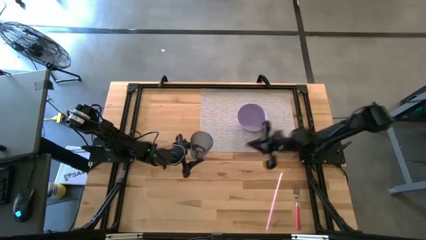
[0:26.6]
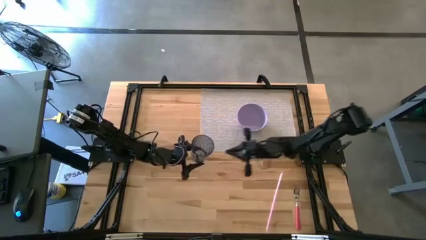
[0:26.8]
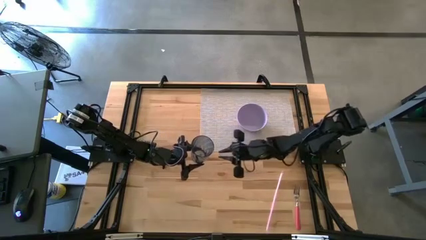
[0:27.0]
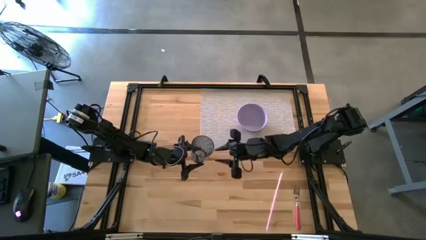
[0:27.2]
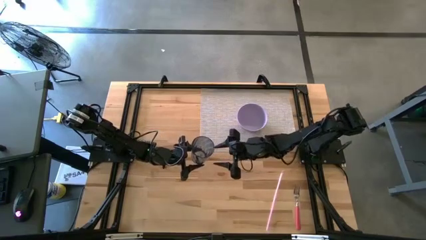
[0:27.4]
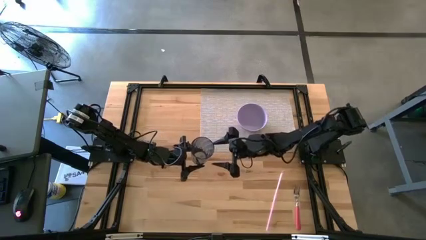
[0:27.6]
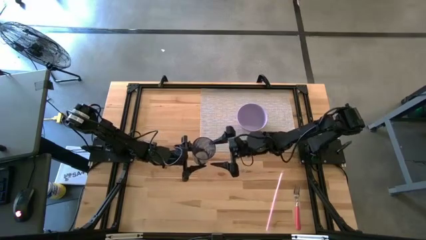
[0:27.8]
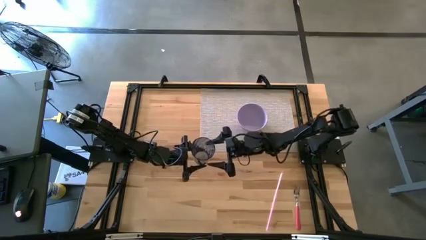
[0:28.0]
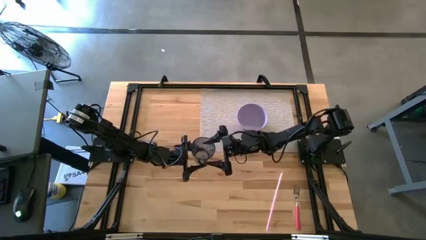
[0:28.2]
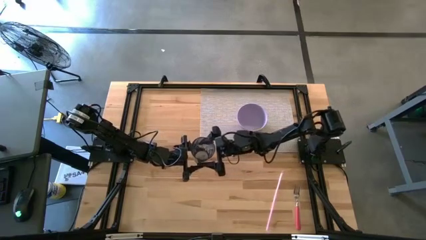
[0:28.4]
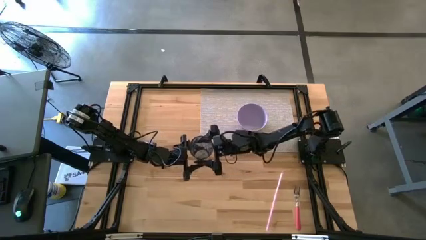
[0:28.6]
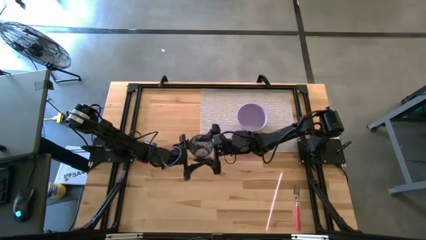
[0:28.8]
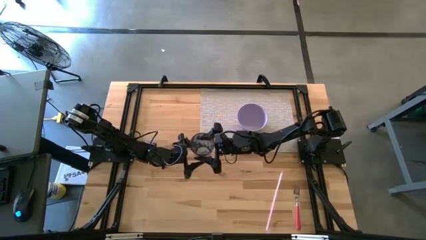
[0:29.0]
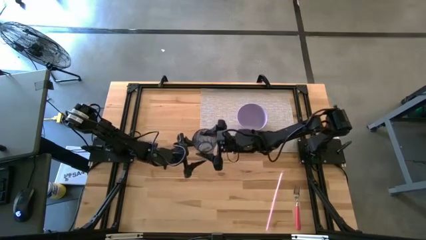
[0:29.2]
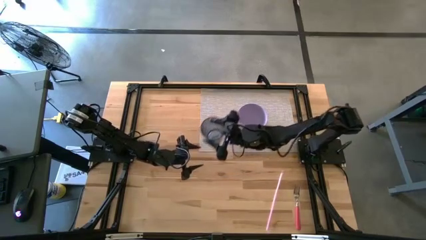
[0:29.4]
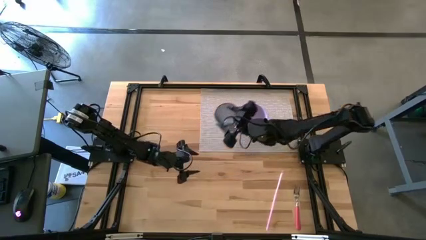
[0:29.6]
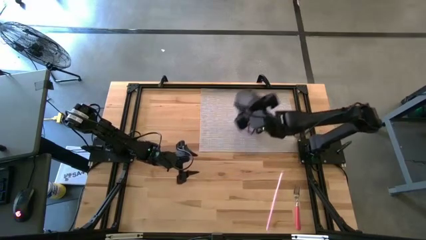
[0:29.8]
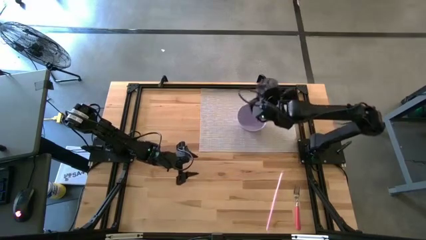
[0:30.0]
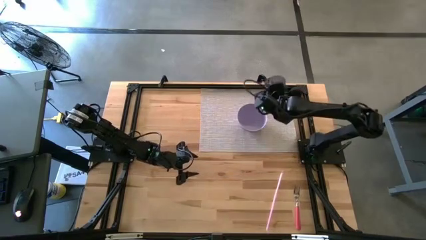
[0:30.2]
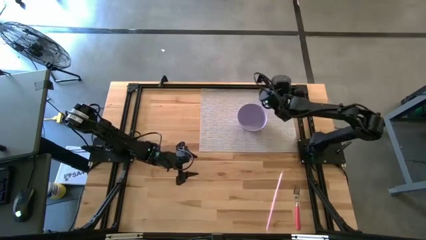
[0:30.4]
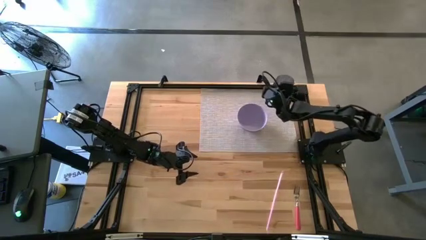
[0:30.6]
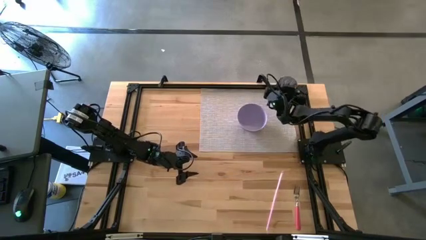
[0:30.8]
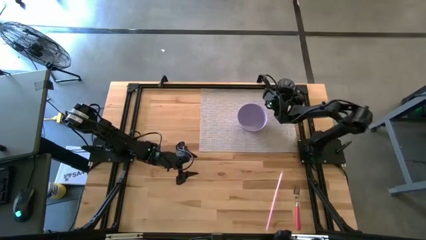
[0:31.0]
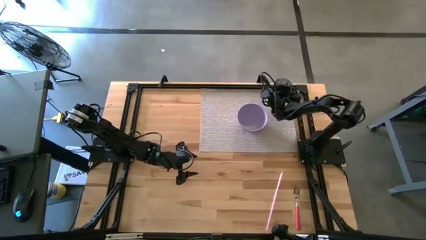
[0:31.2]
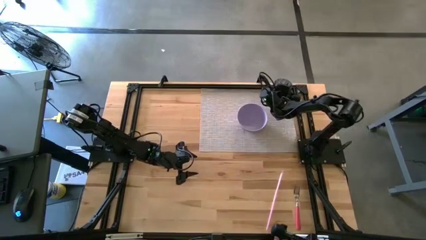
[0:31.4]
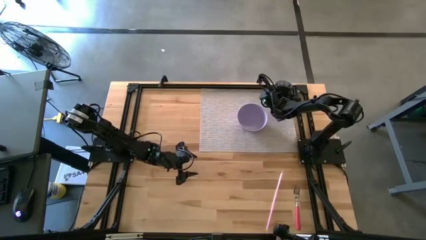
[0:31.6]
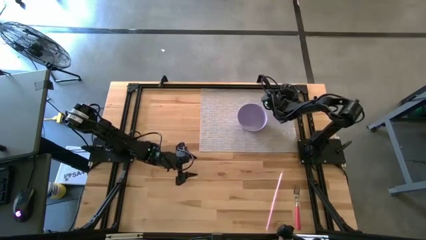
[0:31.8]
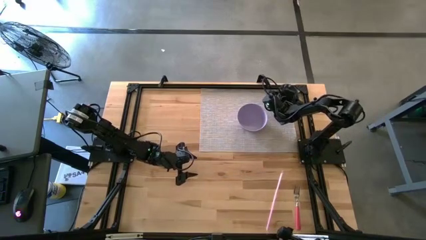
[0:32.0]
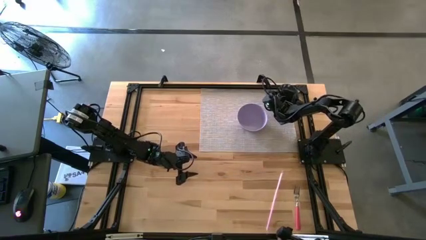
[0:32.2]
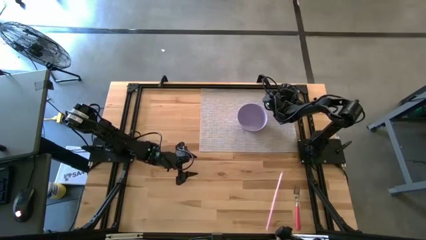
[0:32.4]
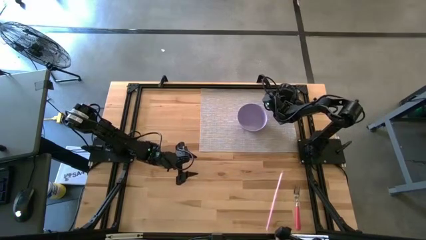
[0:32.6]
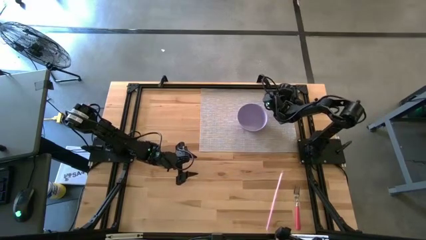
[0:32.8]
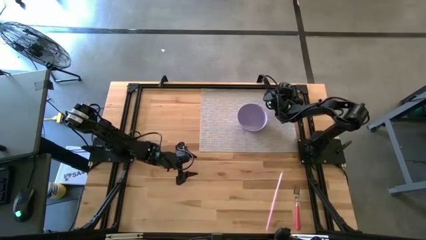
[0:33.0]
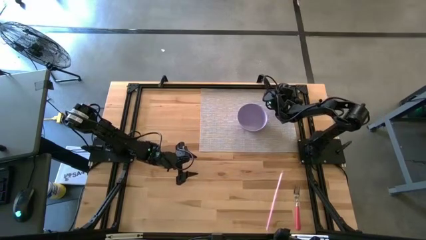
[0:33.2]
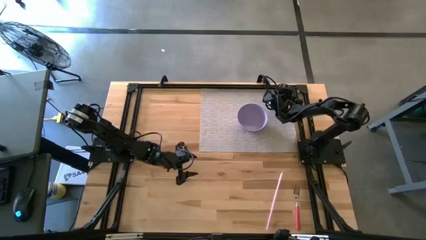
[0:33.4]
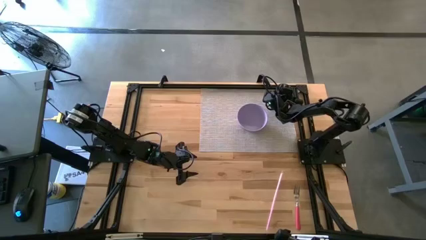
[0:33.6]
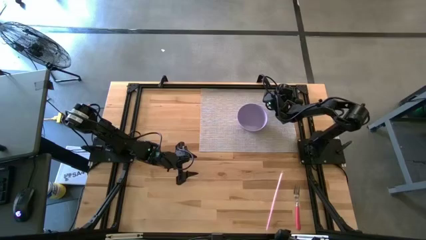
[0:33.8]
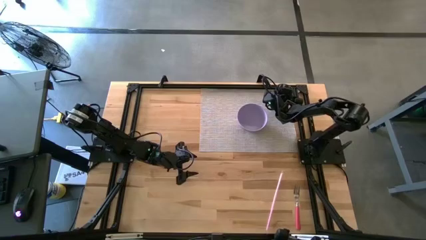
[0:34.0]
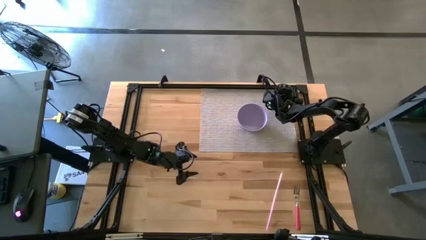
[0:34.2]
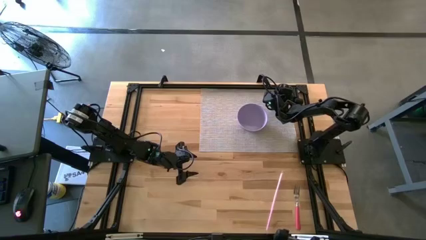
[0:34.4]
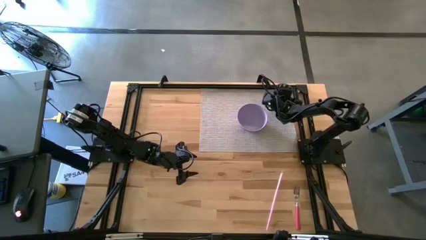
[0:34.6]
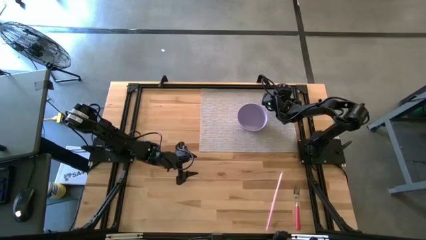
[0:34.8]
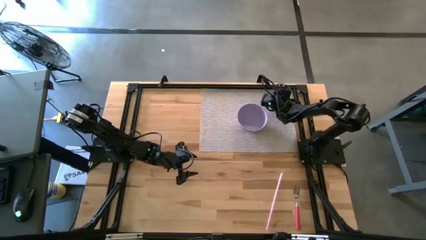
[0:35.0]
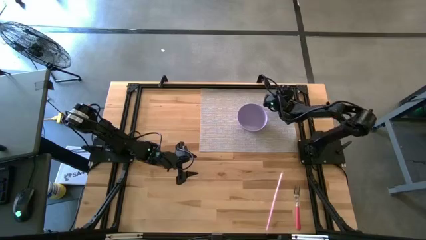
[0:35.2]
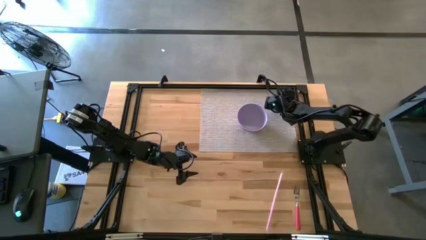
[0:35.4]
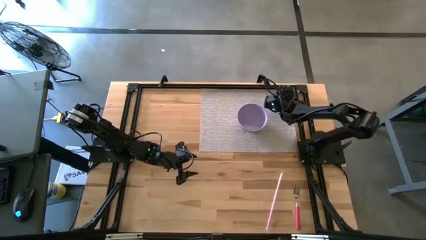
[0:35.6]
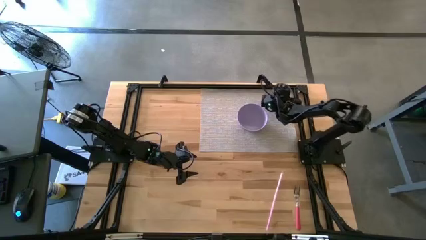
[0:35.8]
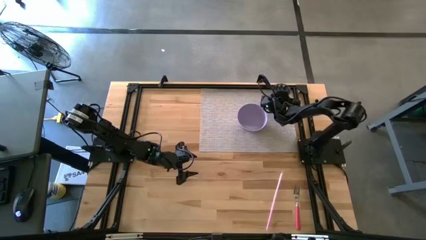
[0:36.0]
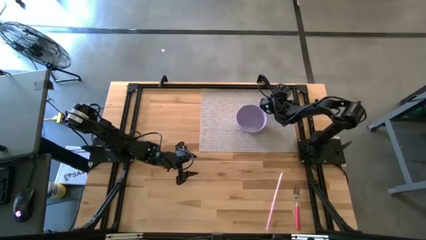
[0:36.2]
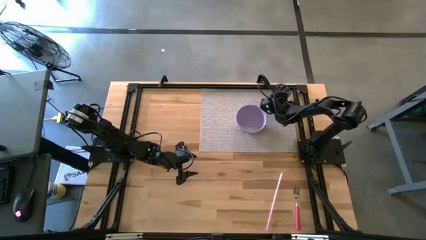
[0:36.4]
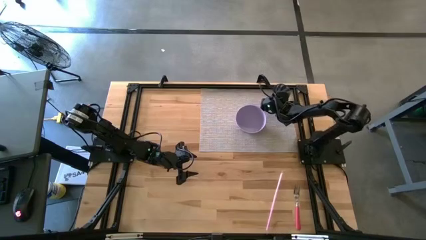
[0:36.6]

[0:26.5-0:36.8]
Task: Pick & Place Utensil
Put the black cup on the gray table mat to the top right of the purple bowl

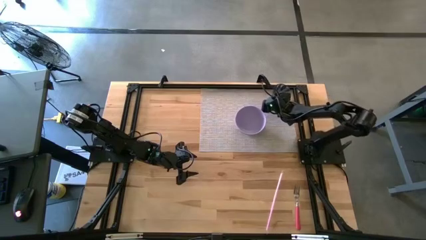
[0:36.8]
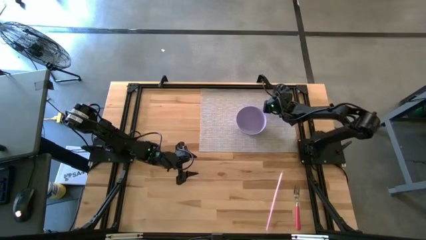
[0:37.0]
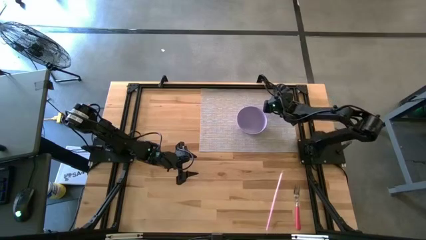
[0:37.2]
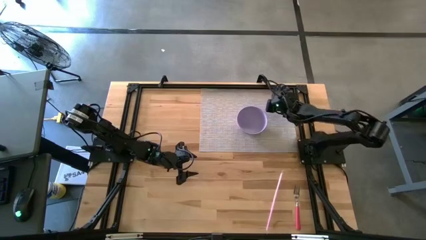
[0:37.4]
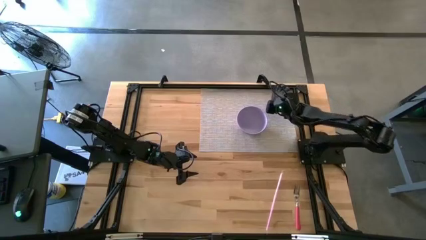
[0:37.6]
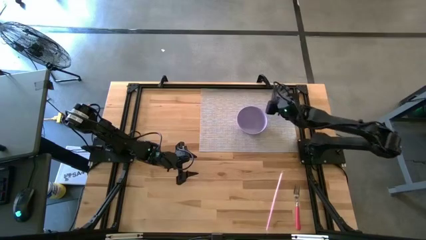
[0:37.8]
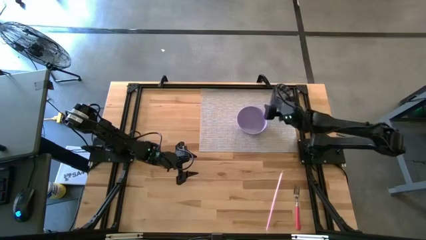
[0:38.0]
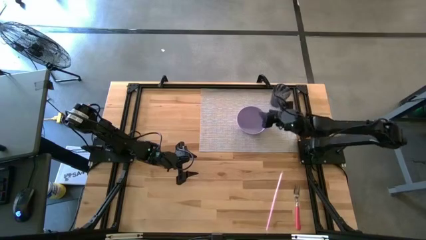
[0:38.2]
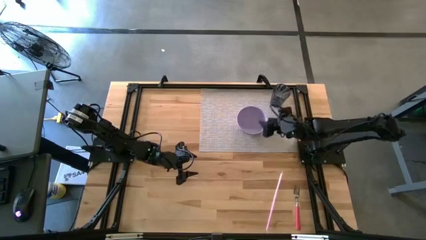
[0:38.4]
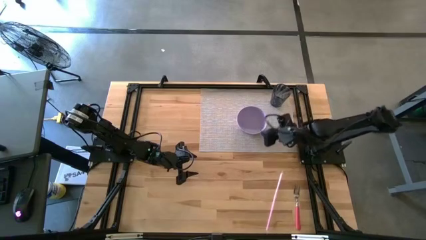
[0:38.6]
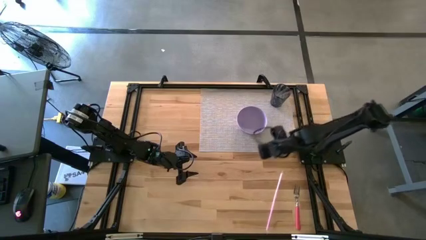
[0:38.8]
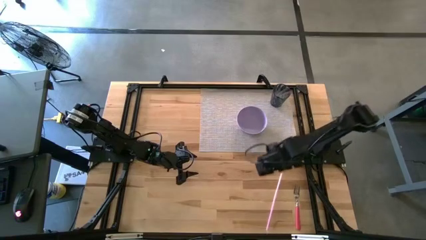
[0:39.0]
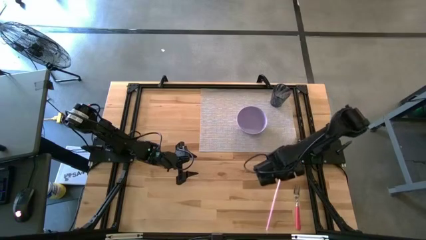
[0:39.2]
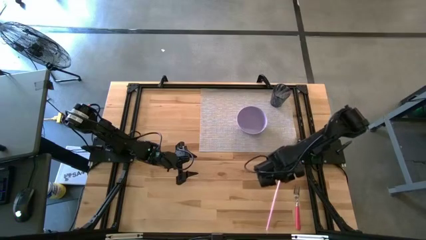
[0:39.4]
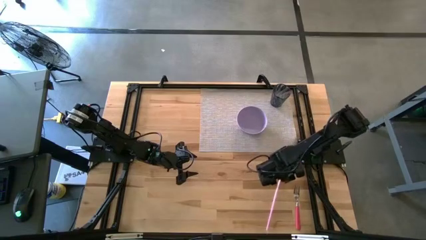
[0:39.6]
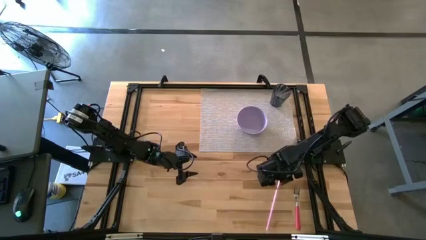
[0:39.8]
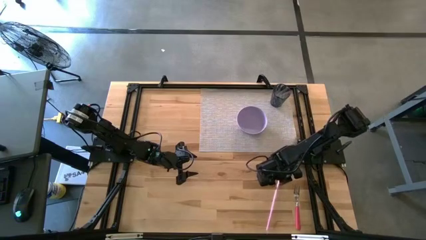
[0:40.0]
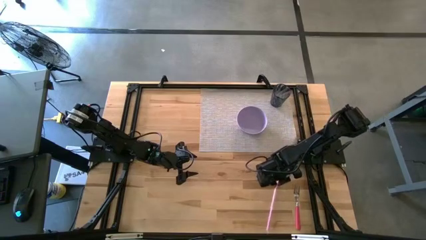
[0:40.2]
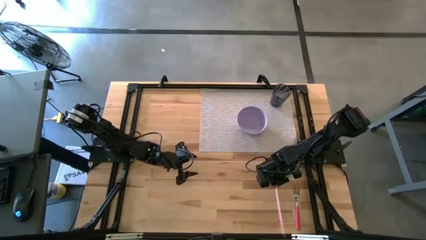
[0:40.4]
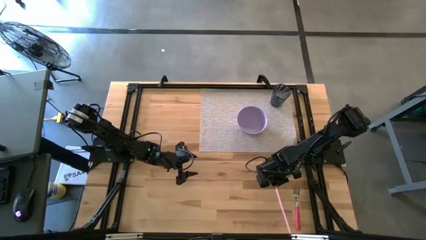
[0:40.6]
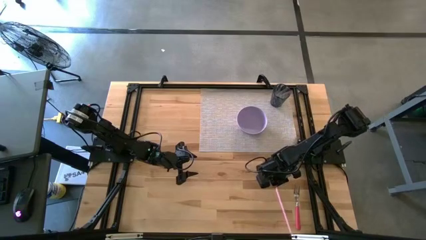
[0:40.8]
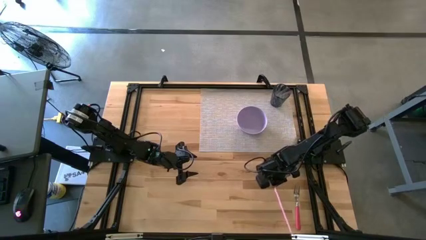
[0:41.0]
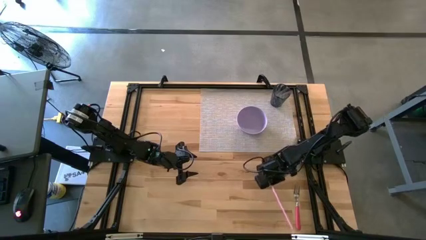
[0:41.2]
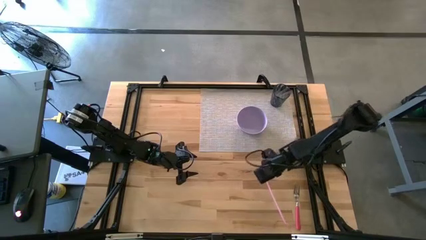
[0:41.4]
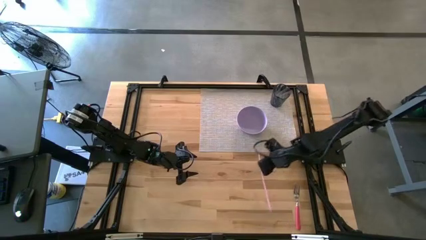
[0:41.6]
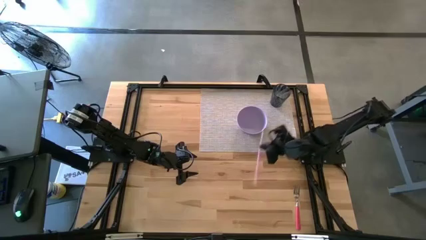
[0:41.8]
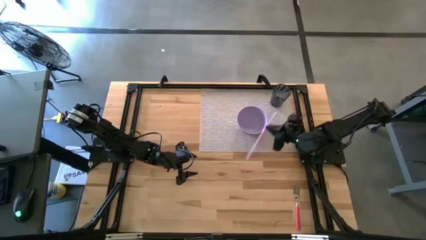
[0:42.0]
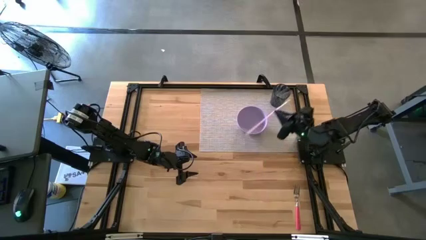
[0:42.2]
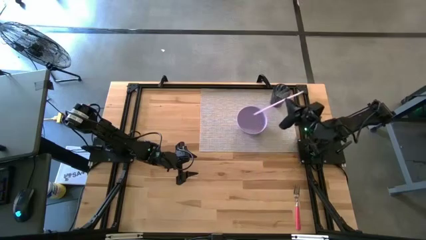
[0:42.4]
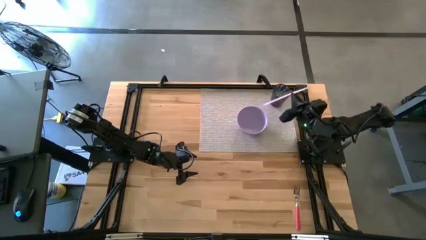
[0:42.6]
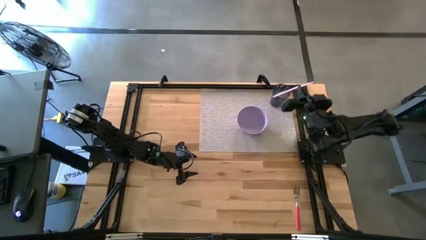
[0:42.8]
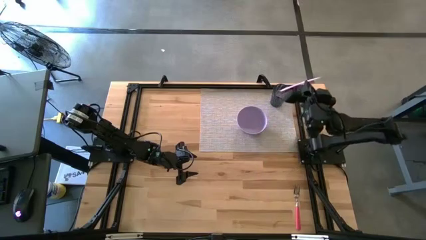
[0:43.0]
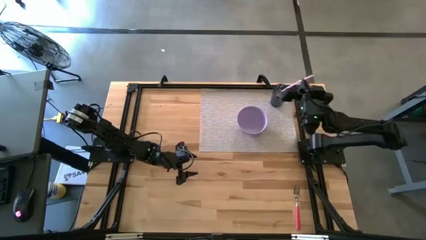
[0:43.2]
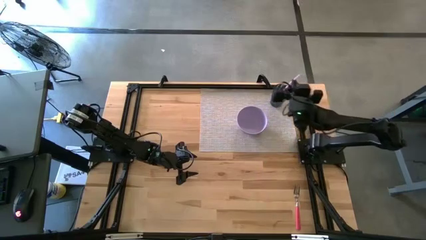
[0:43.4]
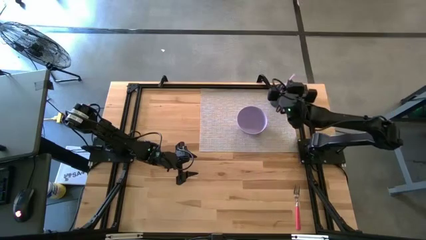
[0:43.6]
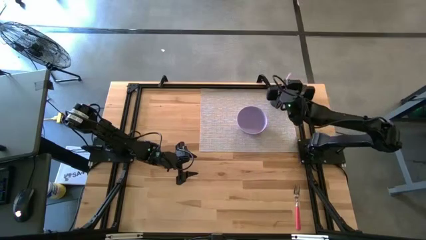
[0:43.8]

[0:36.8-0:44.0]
Put the pink plastic straw into the black cup
